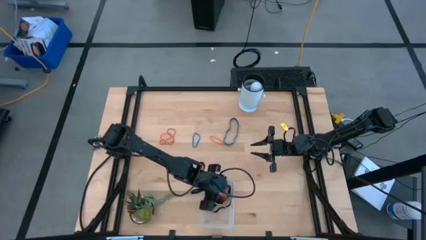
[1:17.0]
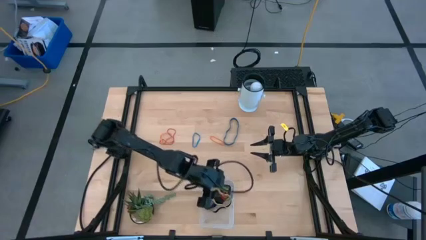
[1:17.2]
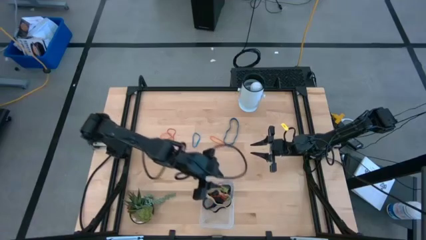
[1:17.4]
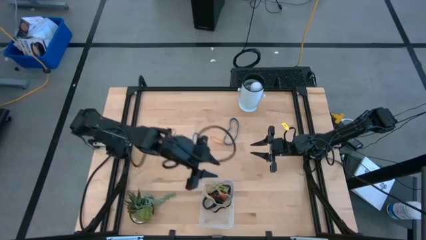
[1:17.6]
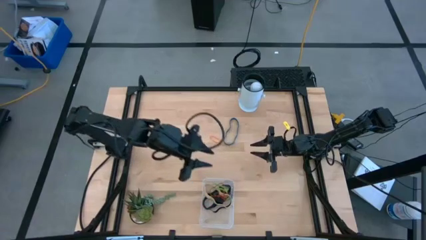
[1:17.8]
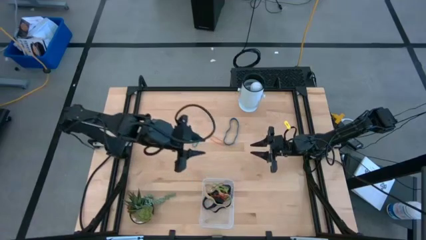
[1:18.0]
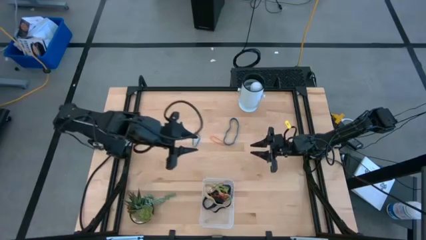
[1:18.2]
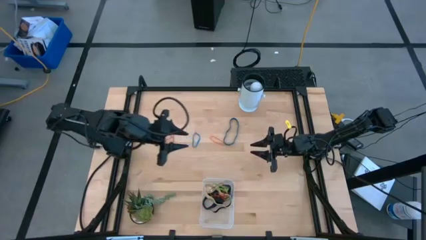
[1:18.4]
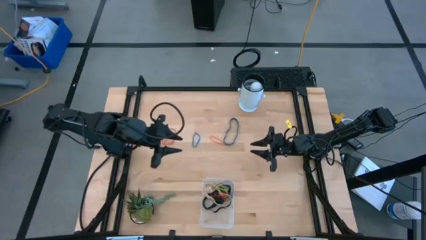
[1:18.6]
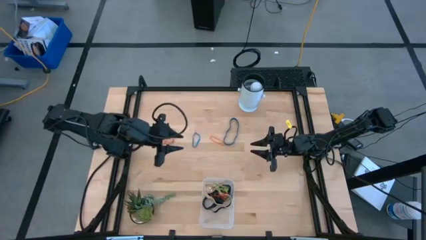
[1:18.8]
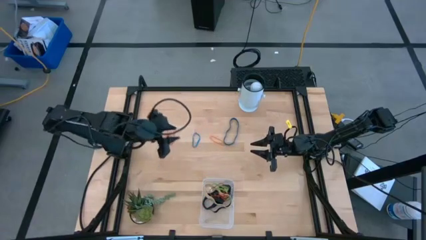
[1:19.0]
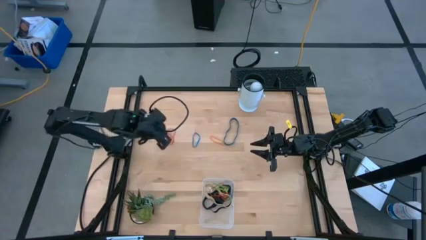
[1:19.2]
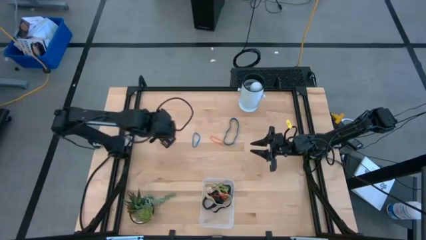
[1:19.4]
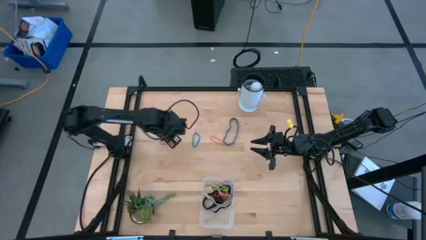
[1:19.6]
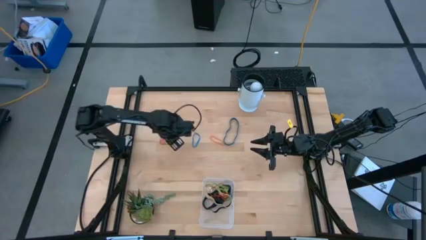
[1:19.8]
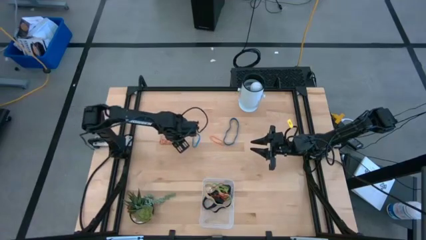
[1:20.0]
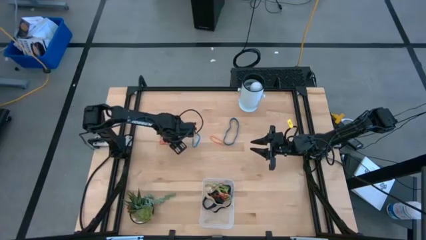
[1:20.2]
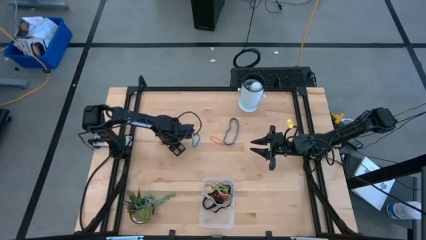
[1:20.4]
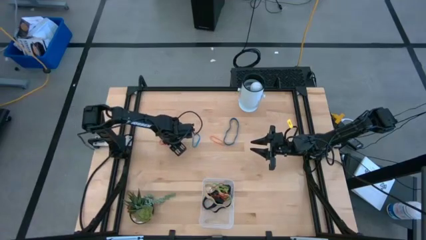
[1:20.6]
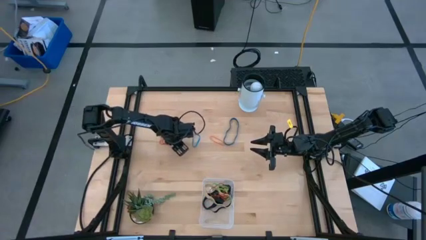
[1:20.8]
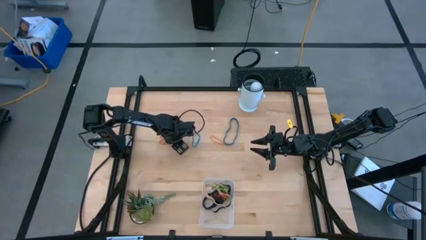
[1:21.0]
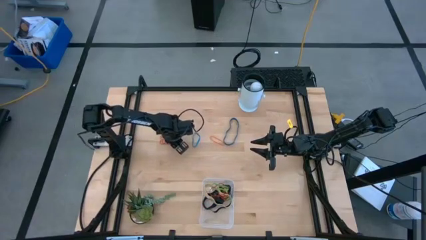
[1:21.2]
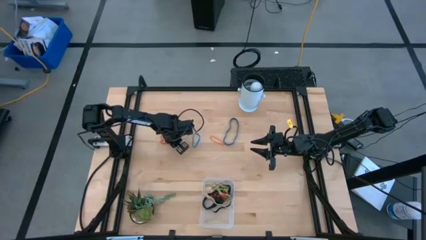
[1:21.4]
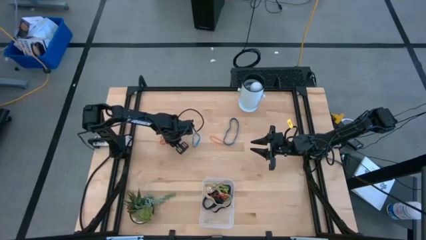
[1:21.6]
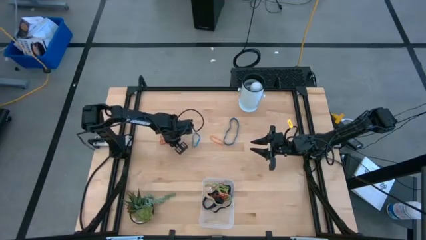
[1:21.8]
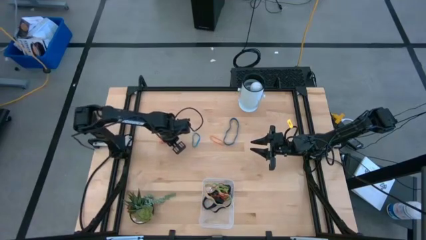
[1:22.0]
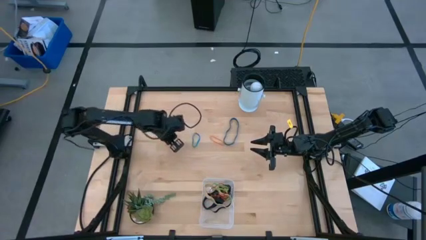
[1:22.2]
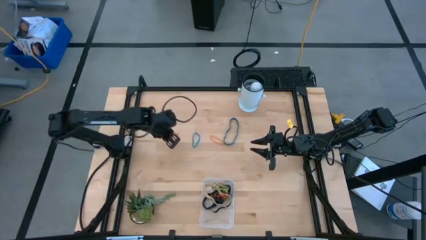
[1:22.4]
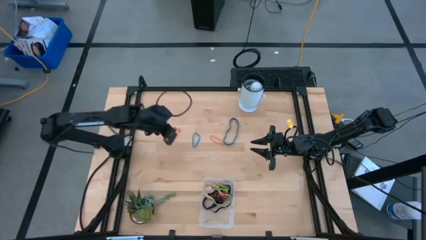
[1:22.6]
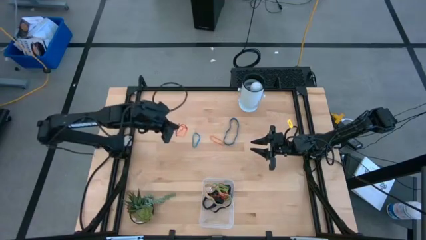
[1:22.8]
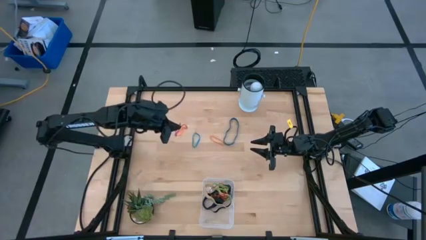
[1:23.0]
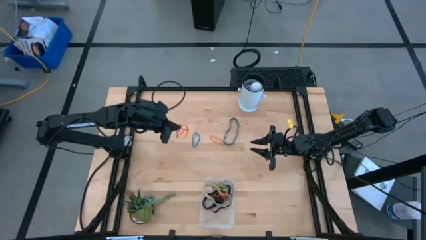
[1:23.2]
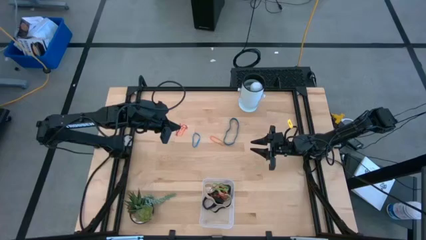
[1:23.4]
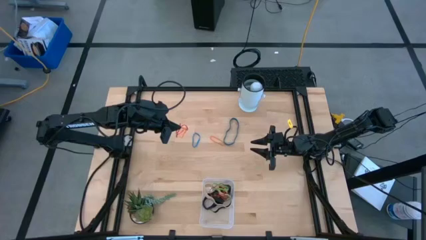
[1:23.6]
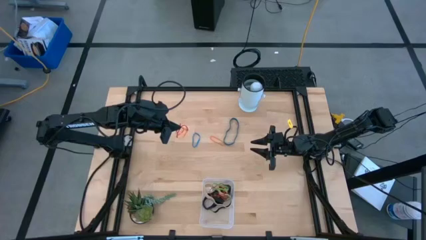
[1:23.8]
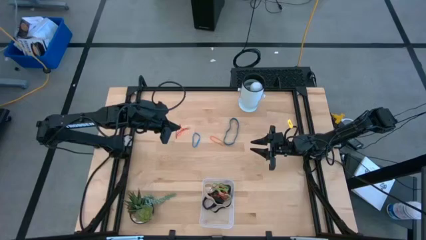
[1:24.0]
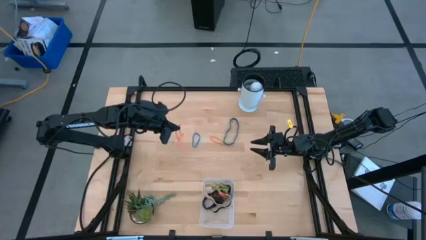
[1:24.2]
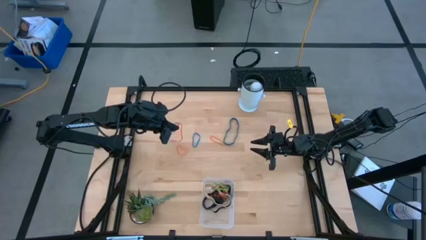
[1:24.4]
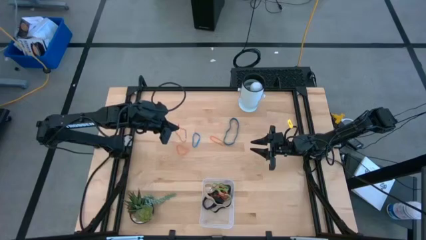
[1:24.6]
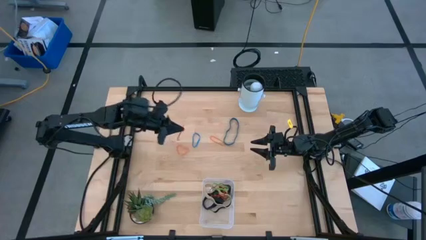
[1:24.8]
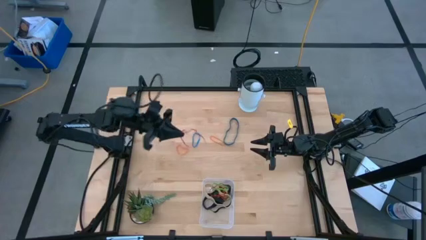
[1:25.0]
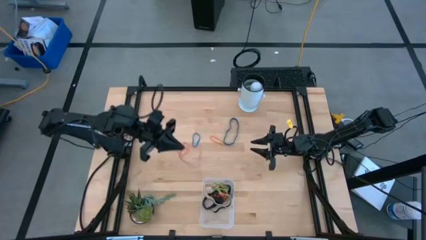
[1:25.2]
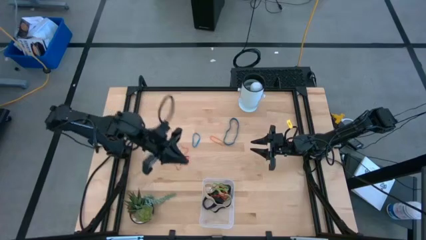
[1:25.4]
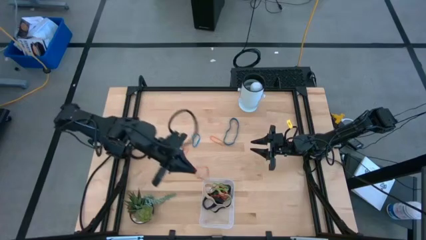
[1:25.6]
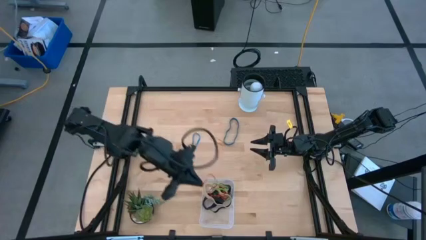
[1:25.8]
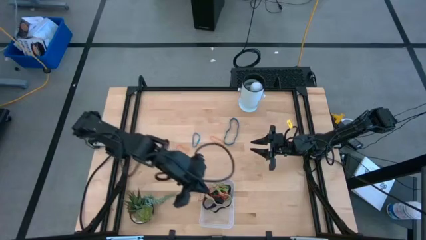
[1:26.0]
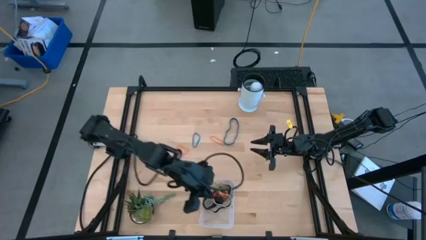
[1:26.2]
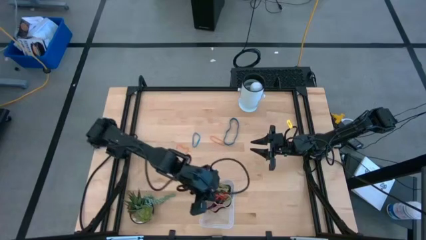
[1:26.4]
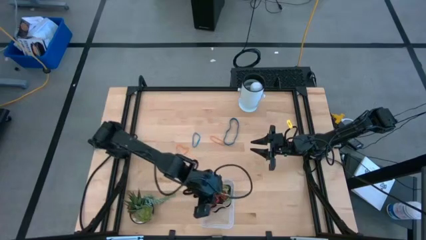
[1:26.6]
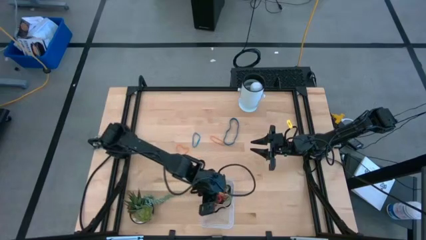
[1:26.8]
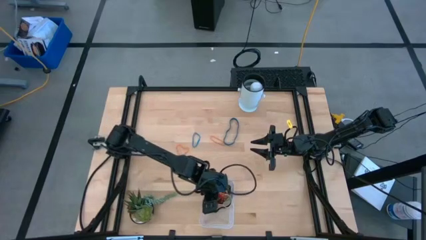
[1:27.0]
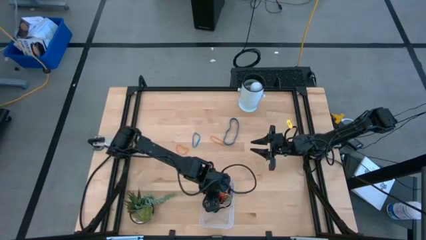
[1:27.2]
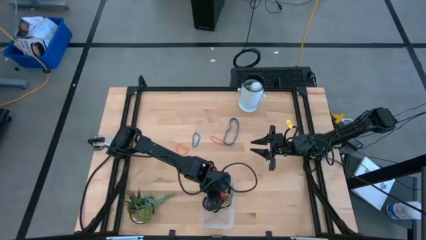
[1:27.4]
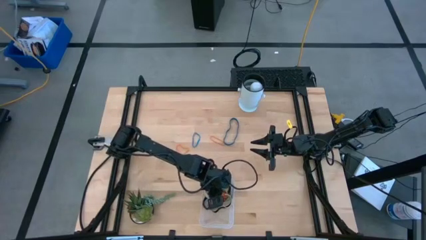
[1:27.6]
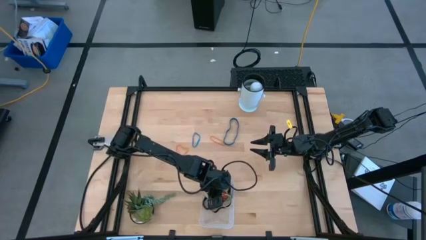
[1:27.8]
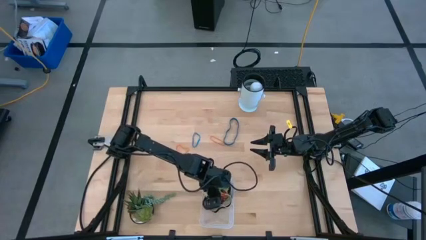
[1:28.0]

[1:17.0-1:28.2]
Task: Pick and place rubber bands into bin
Put the red rubber band into the transparent bin

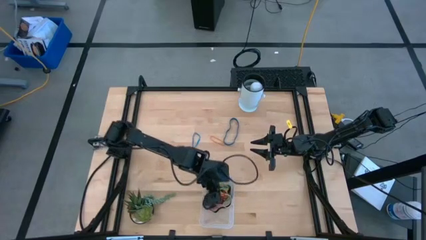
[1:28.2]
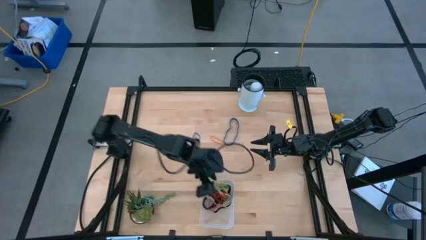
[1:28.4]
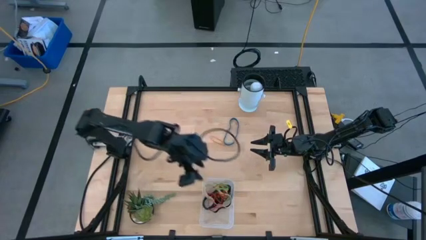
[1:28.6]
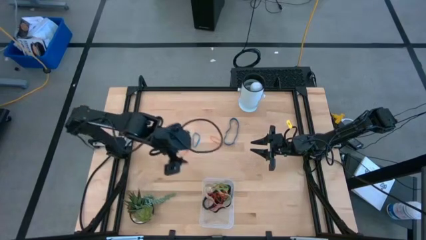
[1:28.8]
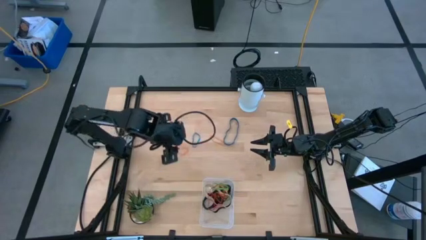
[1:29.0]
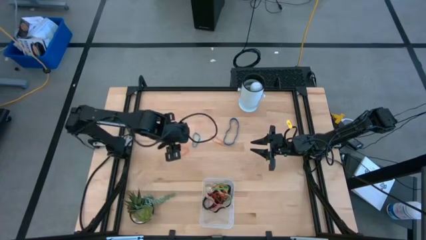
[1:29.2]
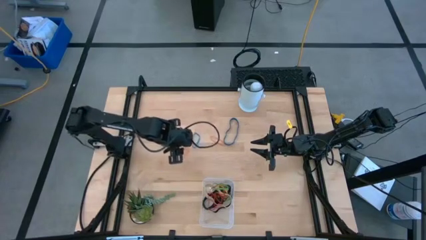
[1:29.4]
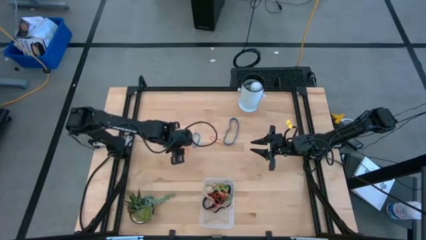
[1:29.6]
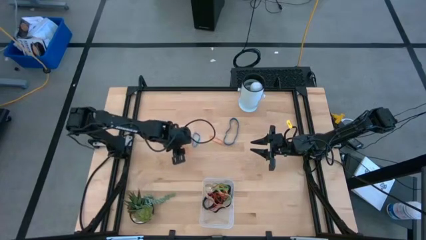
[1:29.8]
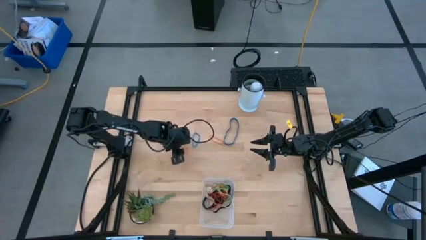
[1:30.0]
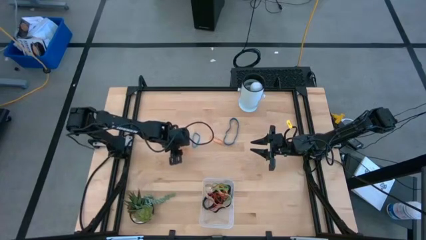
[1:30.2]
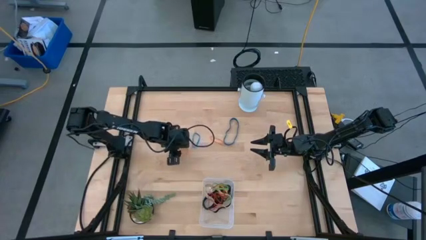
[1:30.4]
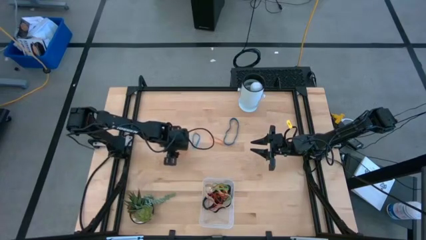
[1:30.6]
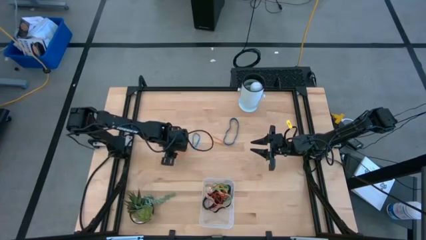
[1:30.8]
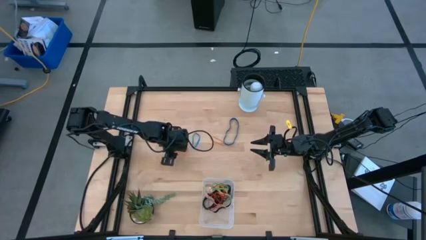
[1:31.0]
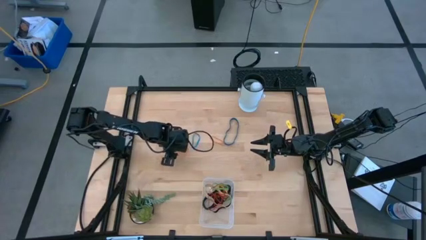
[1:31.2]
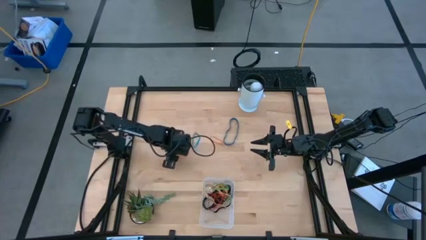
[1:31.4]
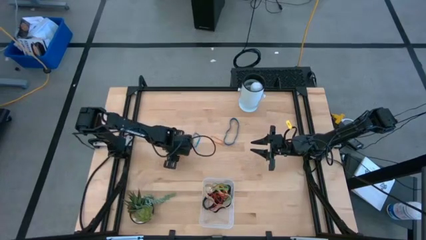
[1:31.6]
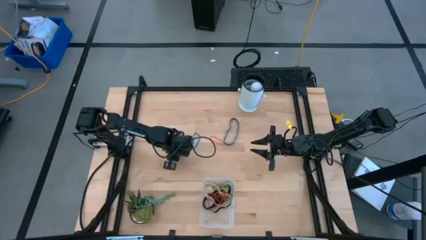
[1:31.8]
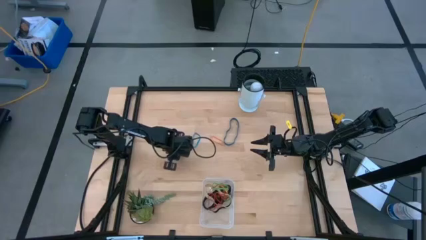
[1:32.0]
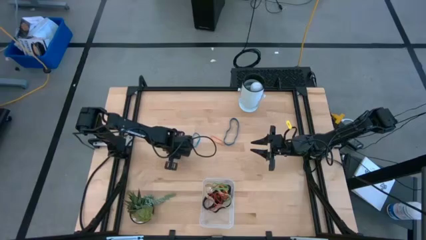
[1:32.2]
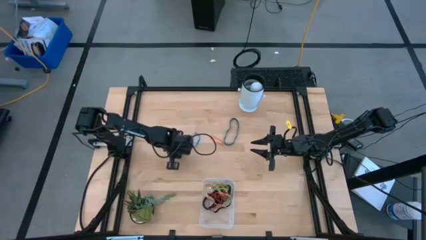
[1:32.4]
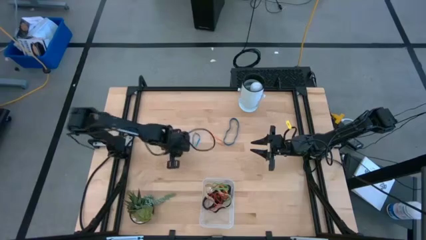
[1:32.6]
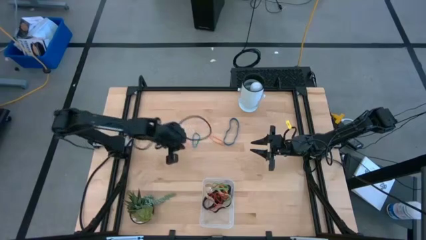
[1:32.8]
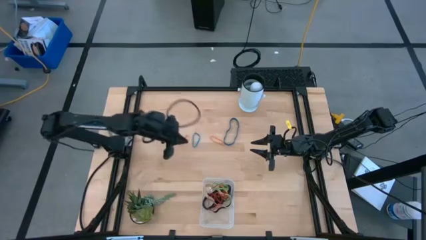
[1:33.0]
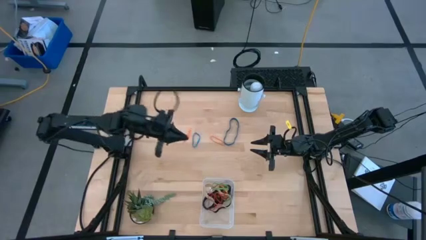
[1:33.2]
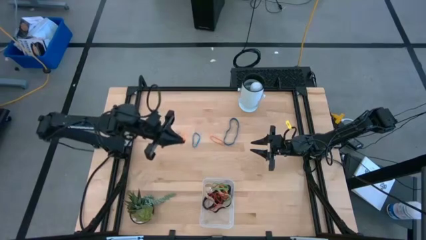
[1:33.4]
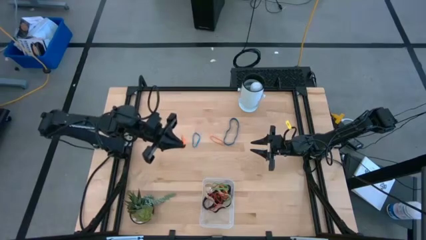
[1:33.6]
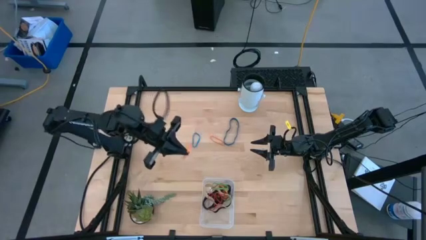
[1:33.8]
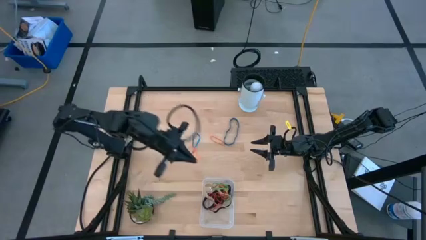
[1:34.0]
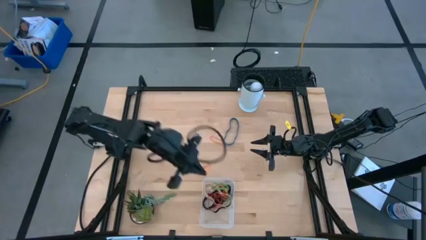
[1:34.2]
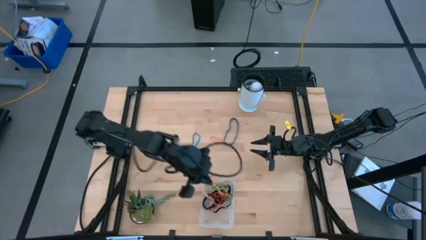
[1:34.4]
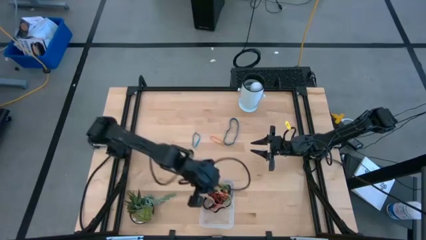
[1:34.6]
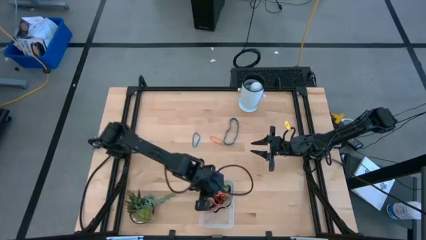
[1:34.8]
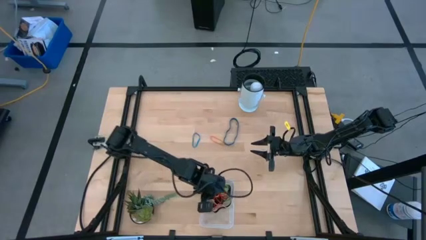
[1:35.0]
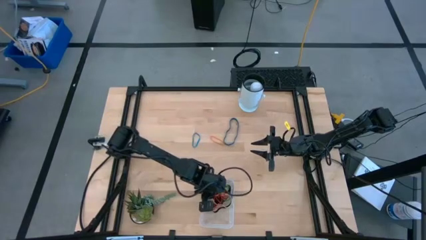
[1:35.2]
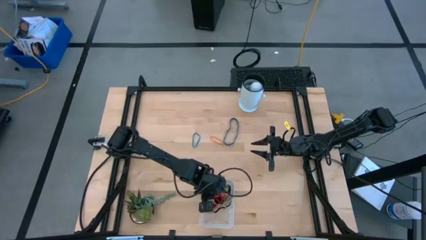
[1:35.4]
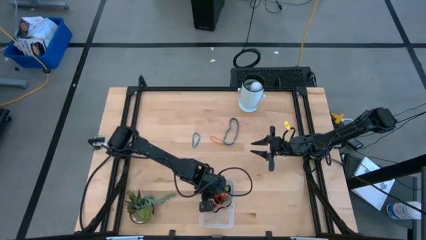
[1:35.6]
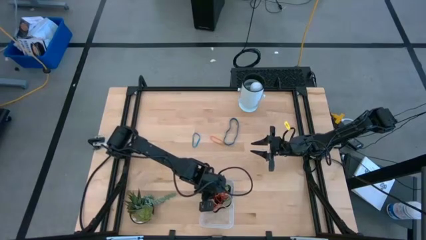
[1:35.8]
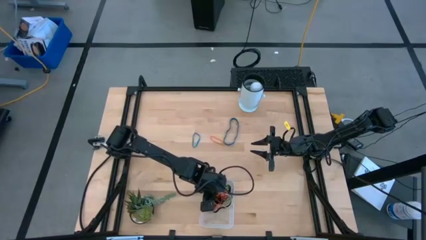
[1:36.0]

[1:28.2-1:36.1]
Put the orange rubber band into the transparent bin
